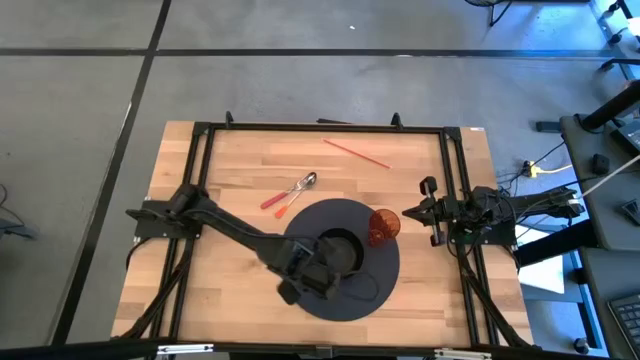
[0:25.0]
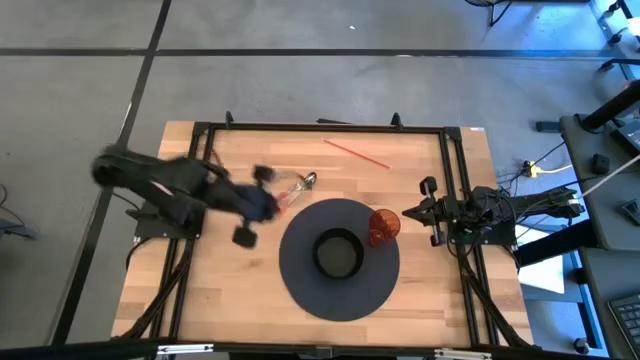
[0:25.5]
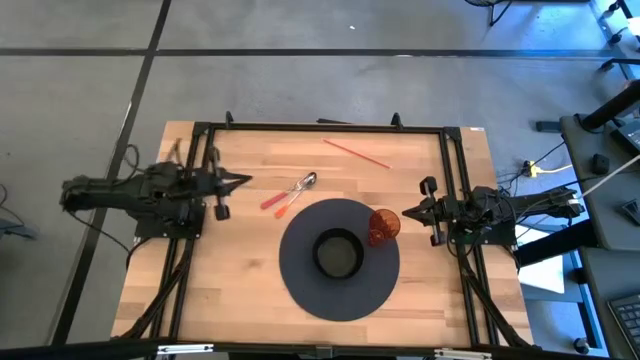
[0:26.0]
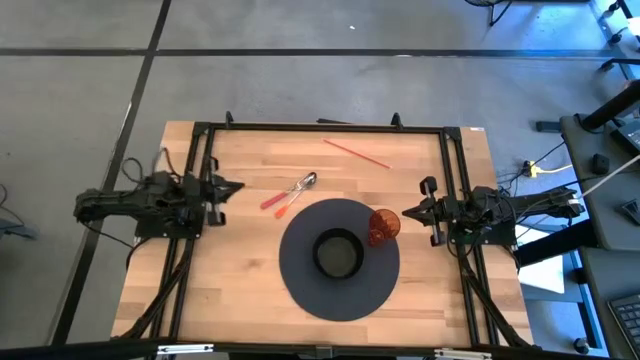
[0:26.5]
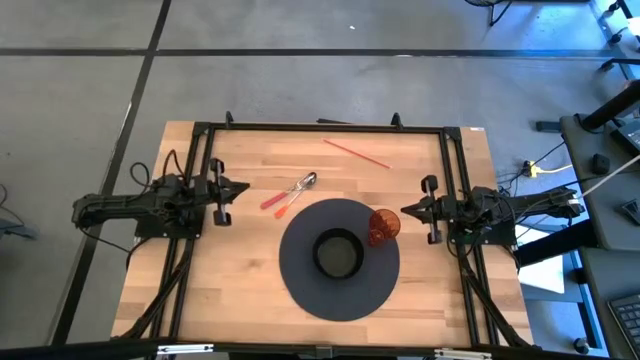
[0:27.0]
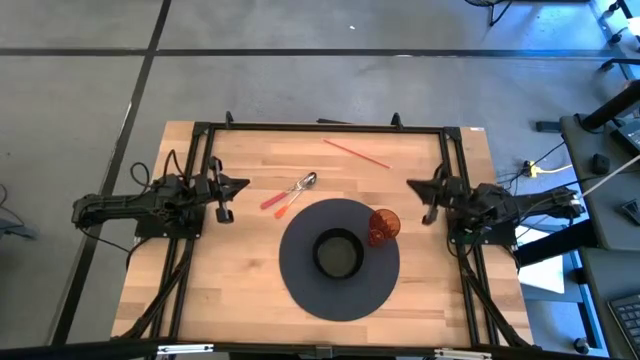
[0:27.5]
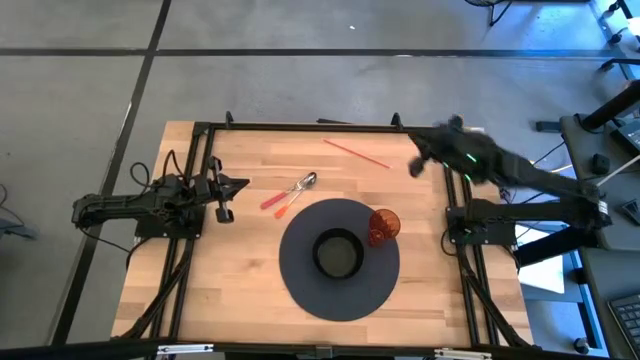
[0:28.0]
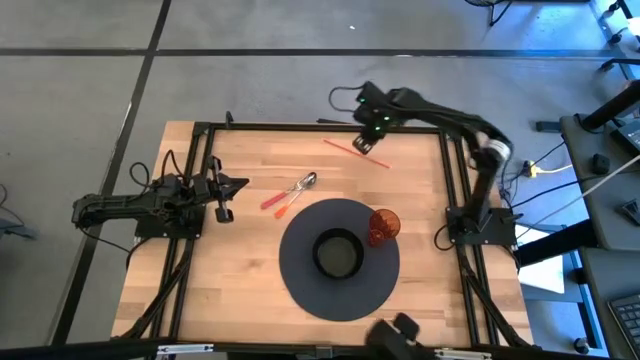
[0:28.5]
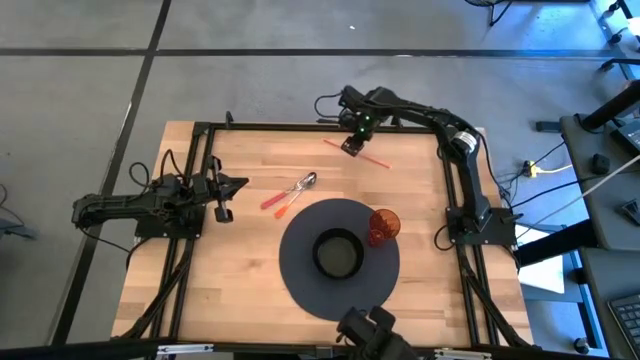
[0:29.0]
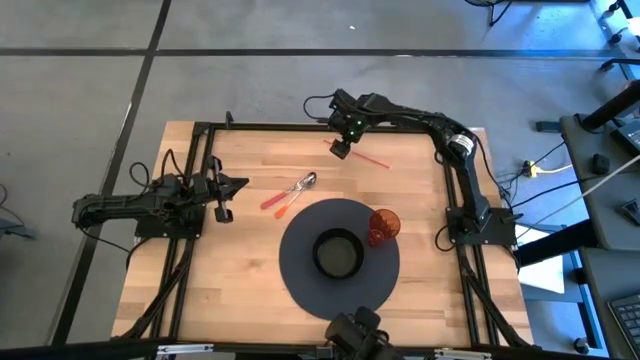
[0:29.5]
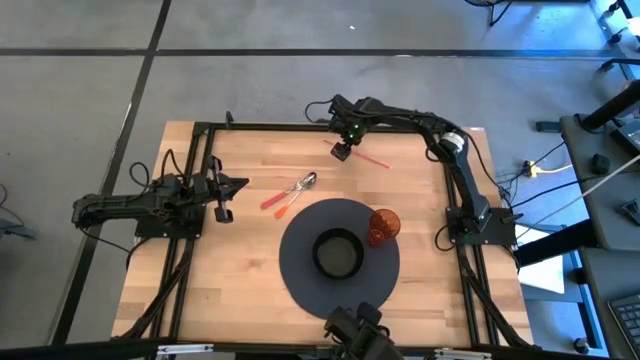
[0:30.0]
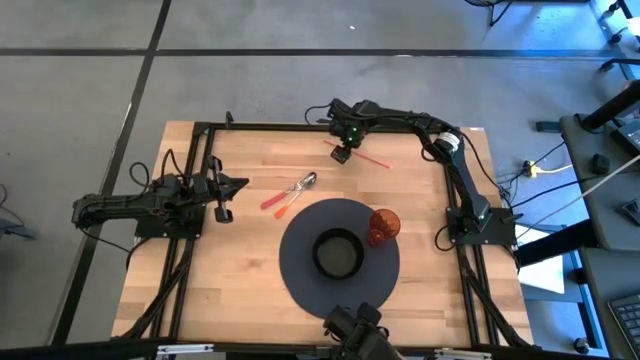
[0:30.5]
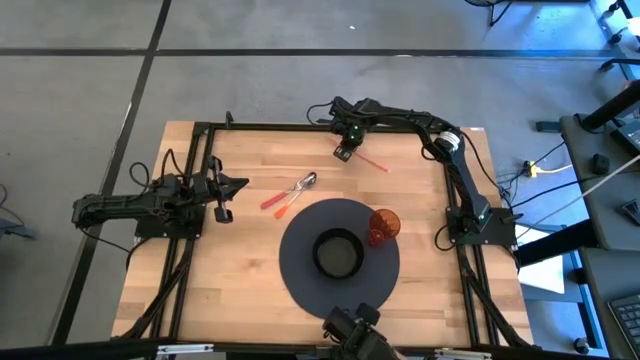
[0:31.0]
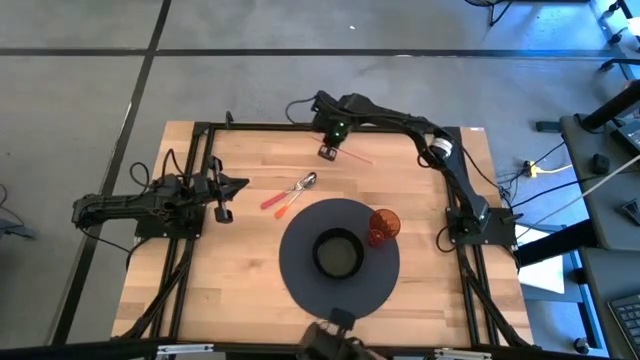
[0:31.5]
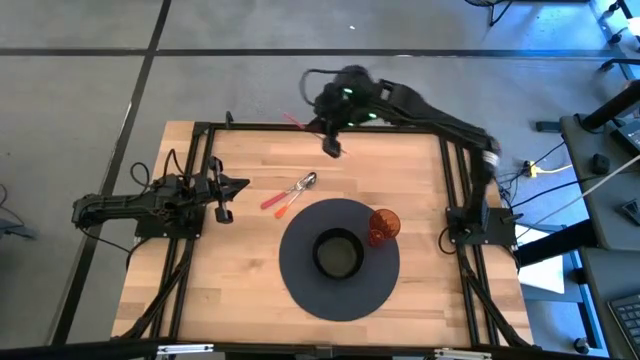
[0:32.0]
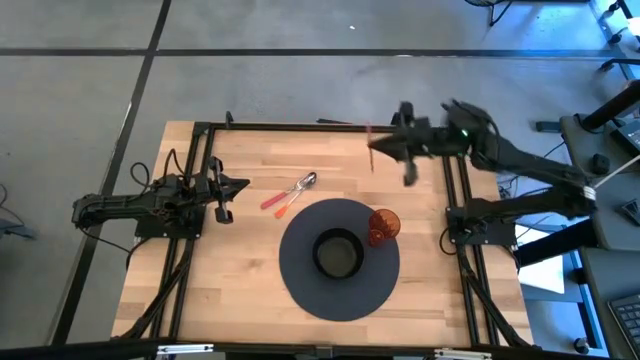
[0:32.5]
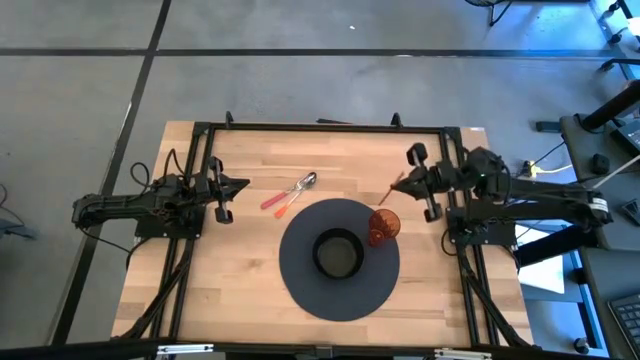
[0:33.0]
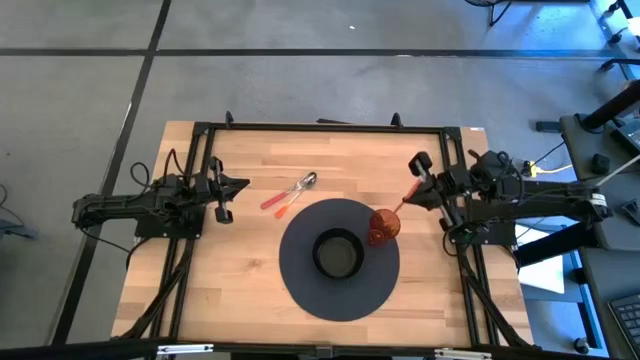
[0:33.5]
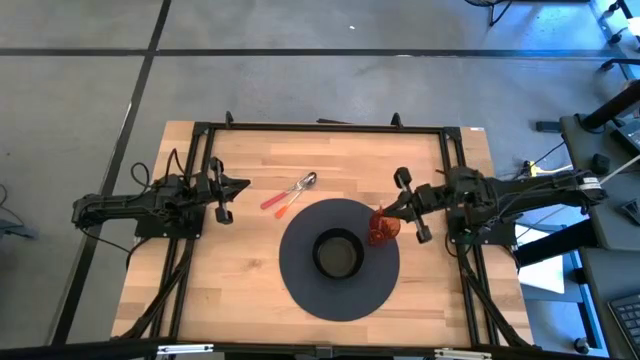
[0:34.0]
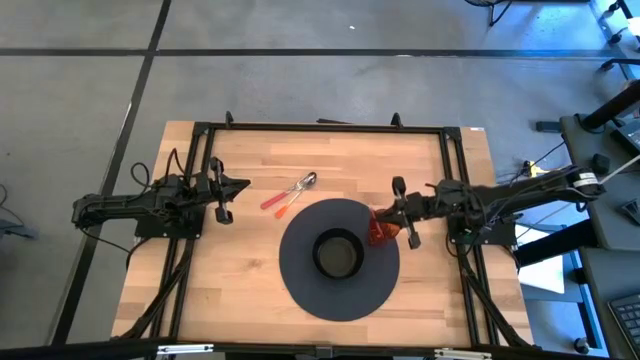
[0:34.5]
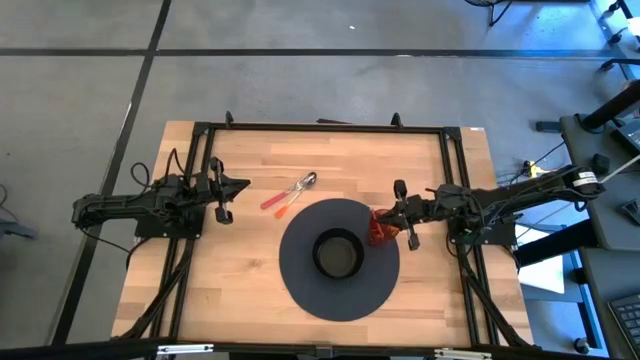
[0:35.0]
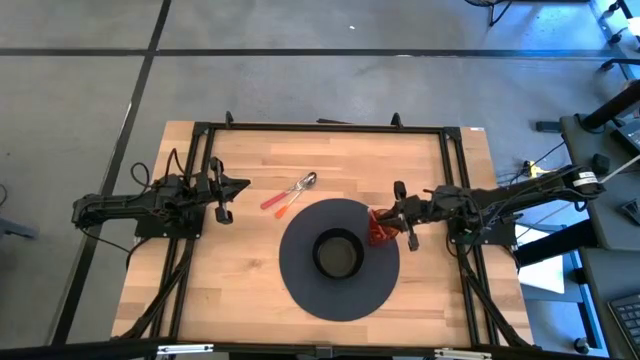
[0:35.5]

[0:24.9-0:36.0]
Task: Pick & Place Utensil
Put the sipping straw in the cup

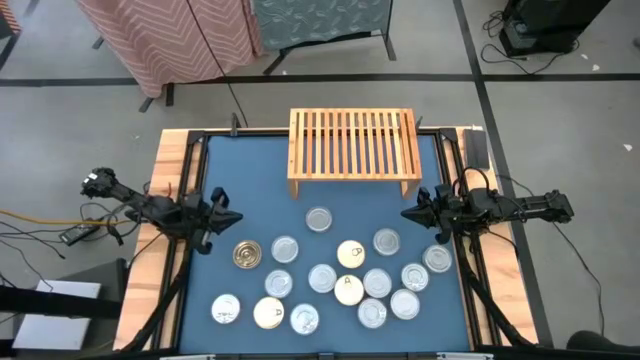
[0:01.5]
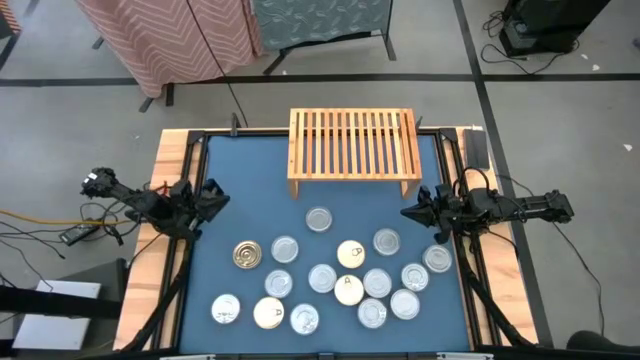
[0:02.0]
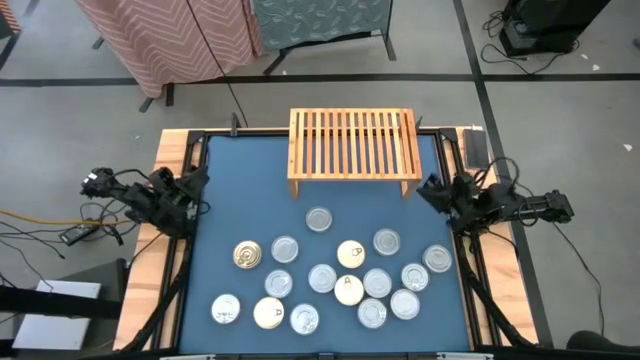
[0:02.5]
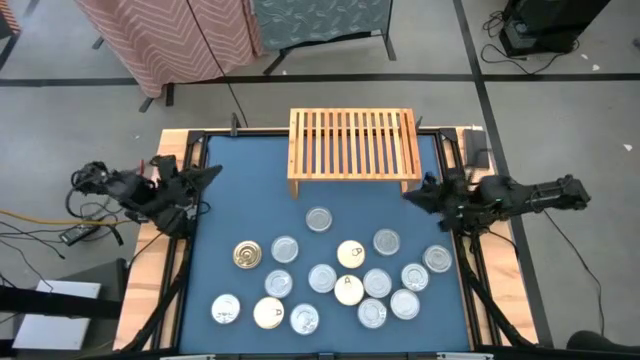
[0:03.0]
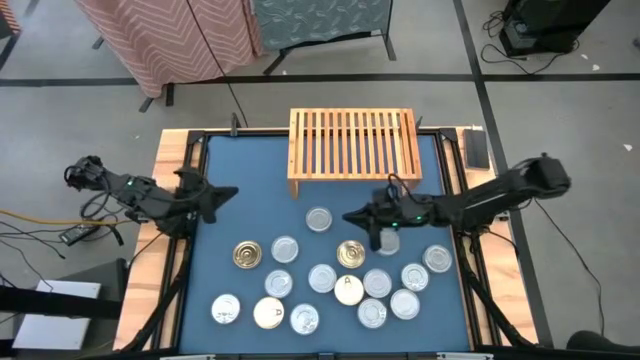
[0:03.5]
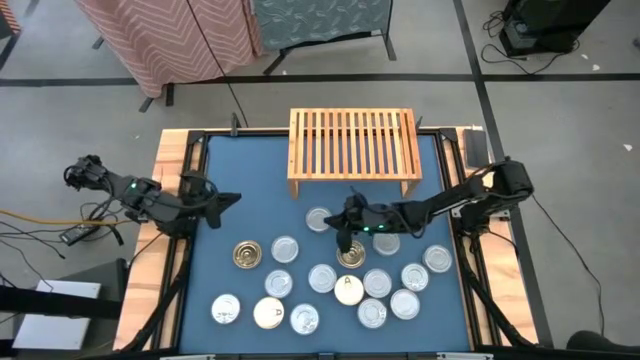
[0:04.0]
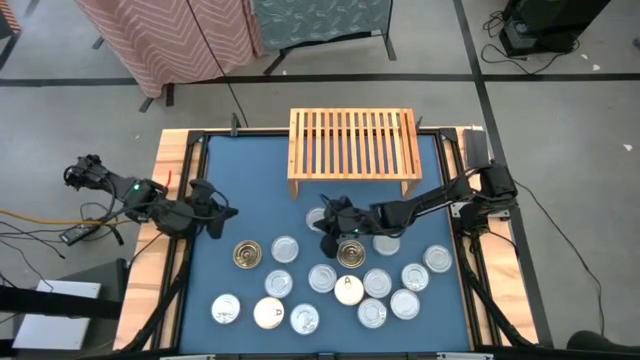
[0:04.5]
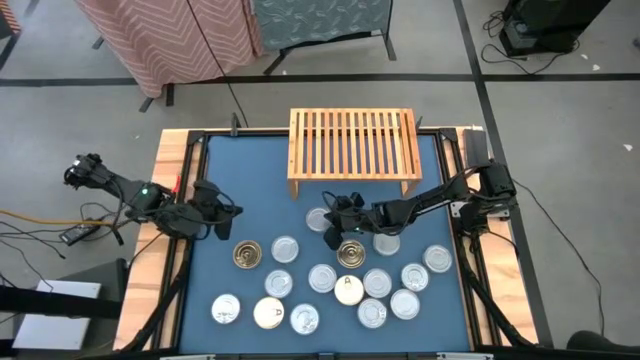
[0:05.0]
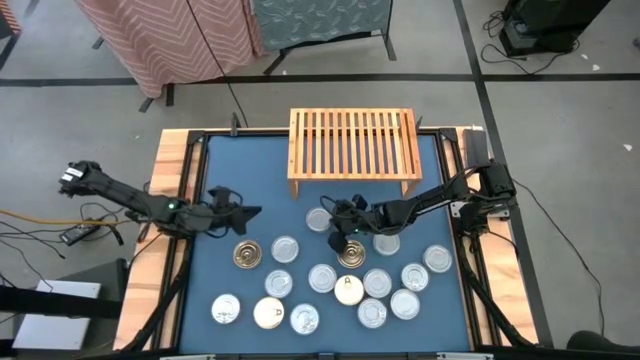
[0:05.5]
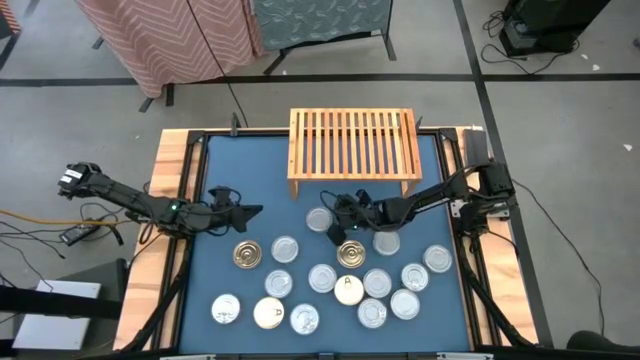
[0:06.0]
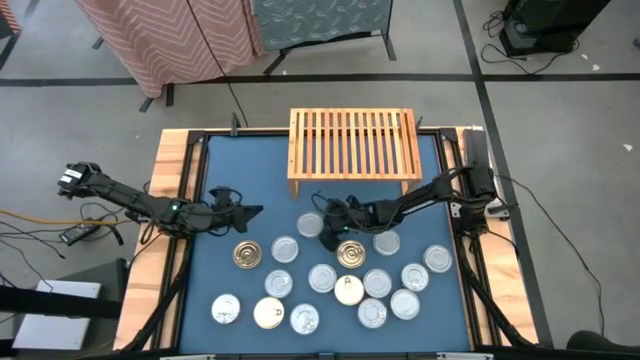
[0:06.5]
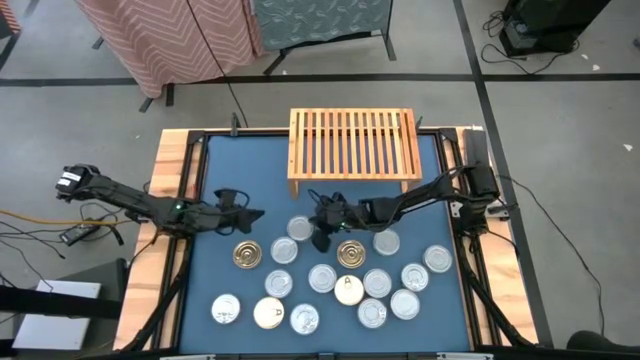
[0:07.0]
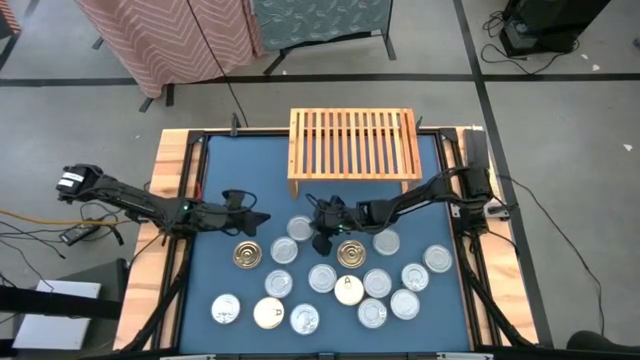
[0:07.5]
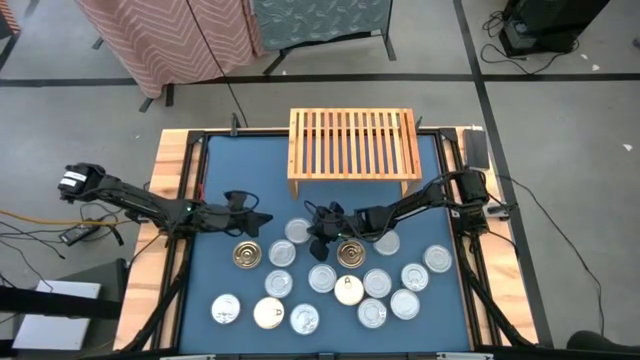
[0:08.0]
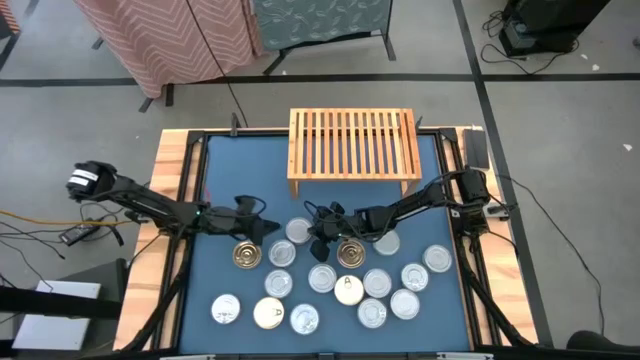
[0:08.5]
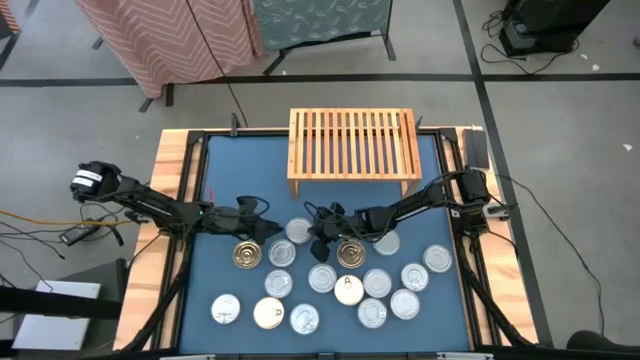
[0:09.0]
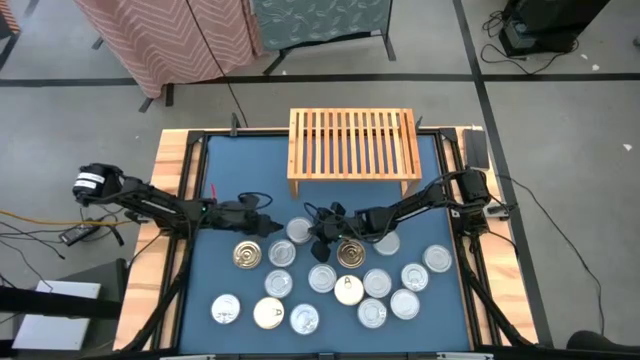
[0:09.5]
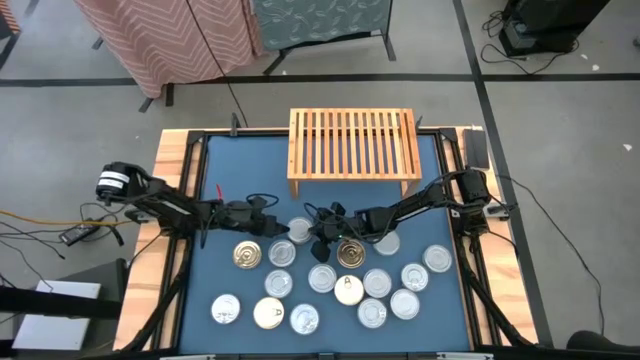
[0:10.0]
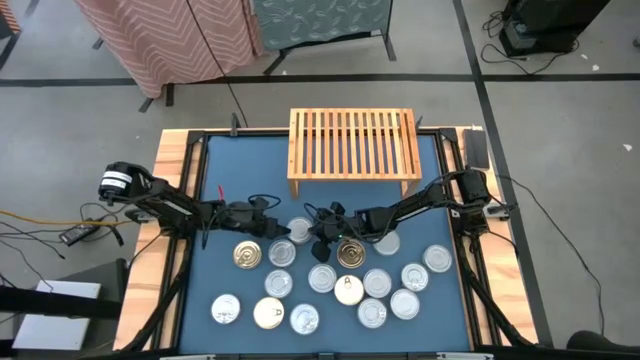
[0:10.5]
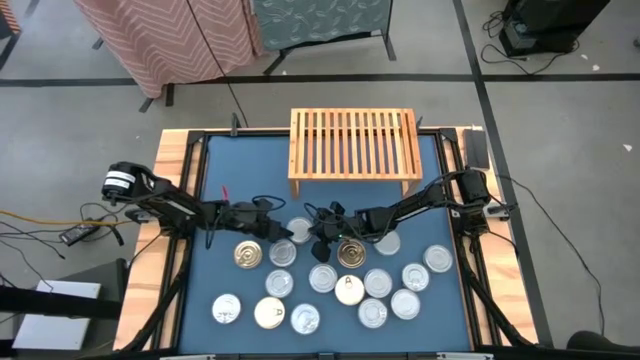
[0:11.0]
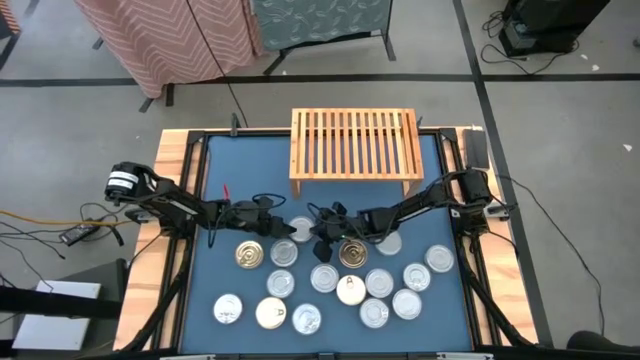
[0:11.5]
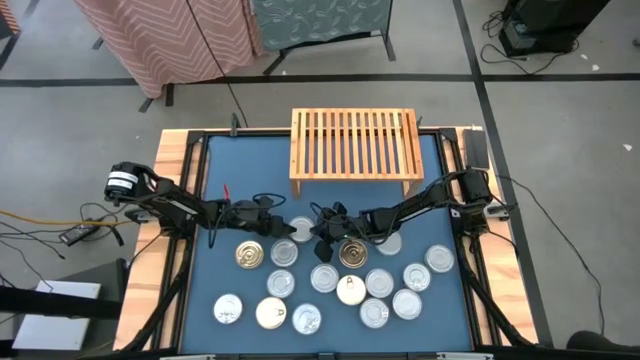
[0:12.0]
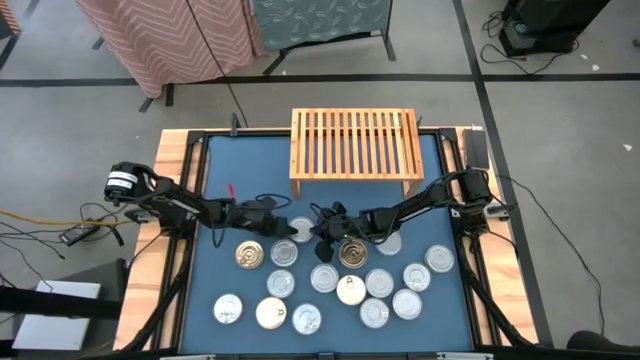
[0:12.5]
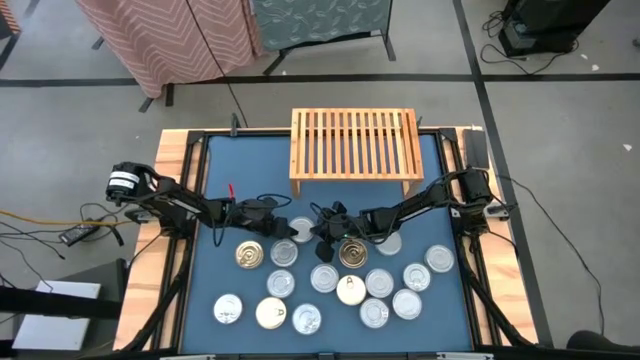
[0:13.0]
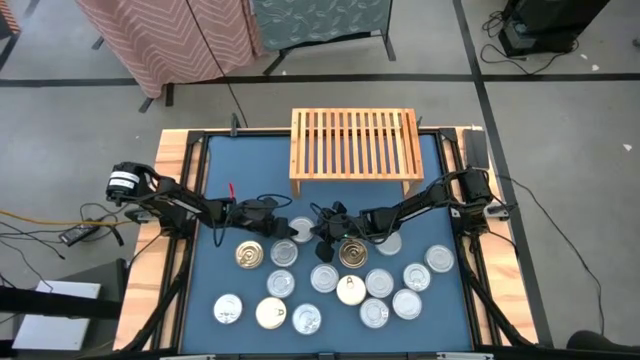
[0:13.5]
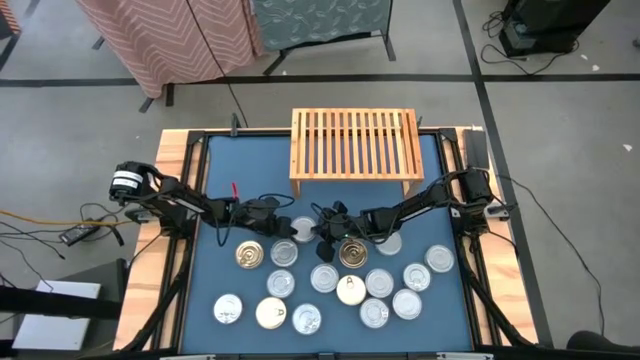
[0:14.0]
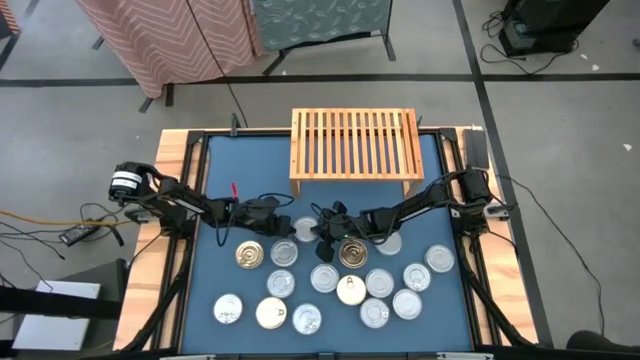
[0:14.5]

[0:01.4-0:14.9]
Task: Stack canned seafood by type on shelf
Put the green tuna can on the shelf
